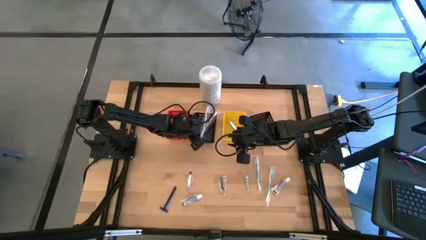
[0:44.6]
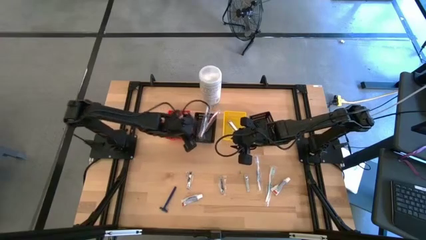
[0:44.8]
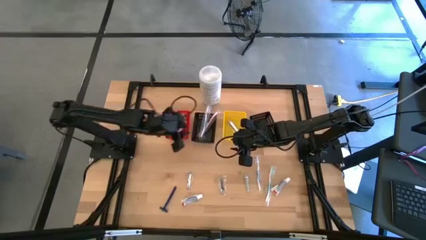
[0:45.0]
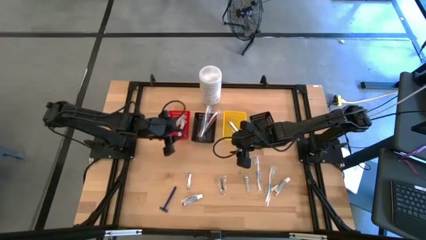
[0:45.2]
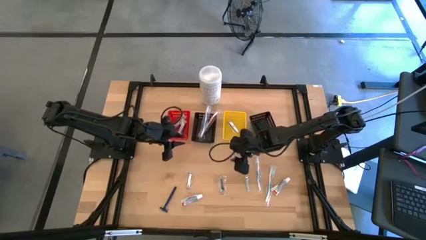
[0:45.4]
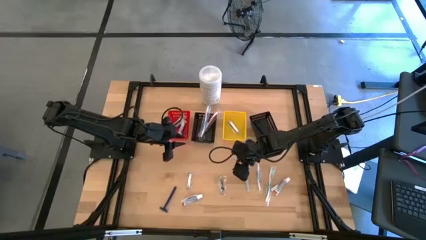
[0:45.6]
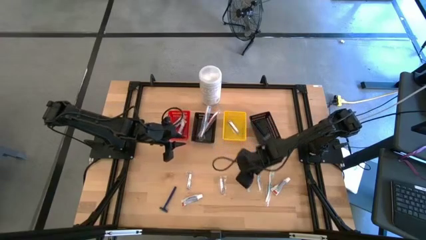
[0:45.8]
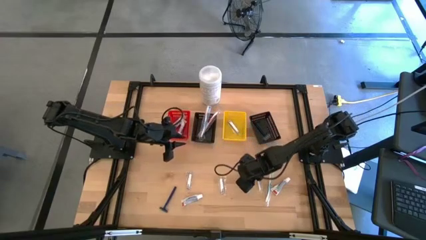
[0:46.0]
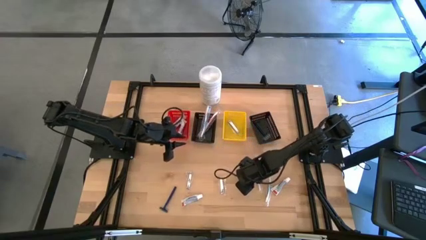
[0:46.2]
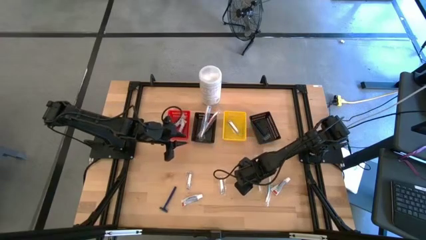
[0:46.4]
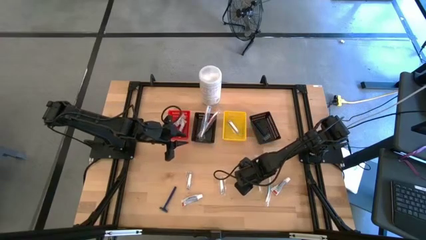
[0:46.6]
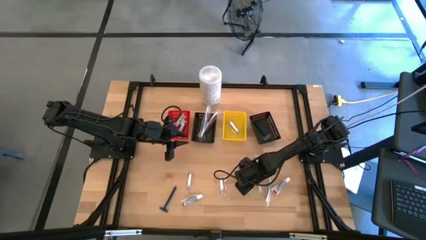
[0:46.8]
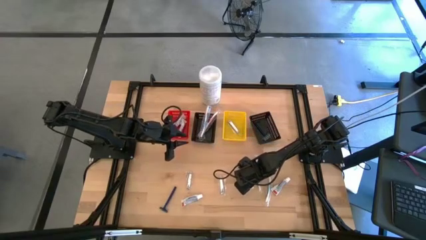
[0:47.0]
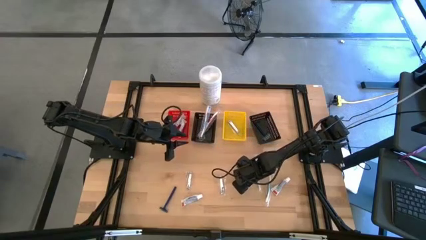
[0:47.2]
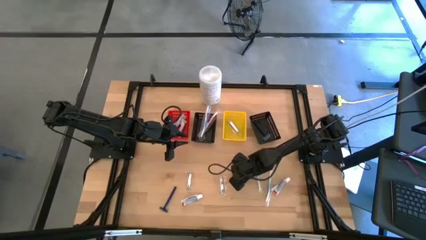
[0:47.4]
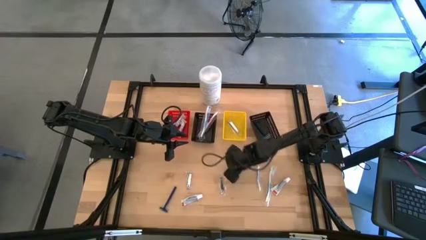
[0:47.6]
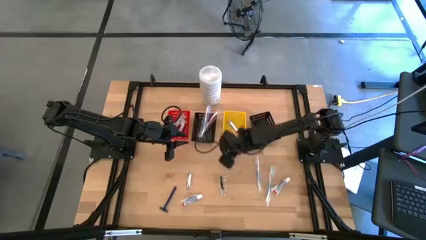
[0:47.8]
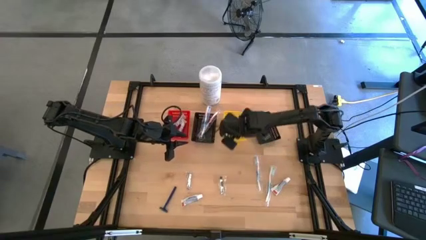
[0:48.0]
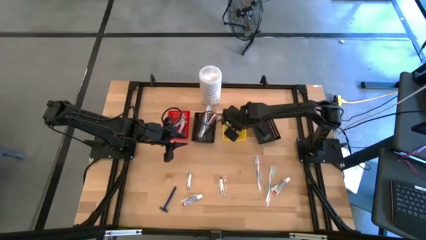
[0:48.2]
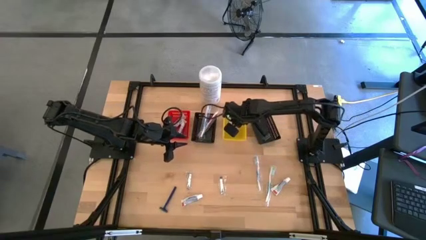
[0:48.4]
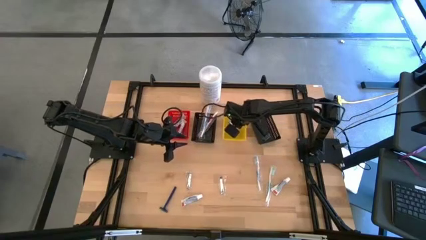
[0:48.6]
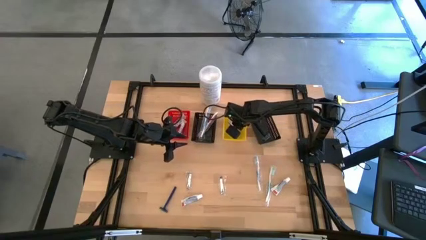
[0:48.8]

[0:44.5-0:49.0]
Task: Pick & Place Travel size toiletries
Put the nail cutter into the yellow basket

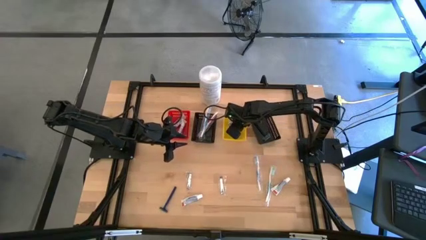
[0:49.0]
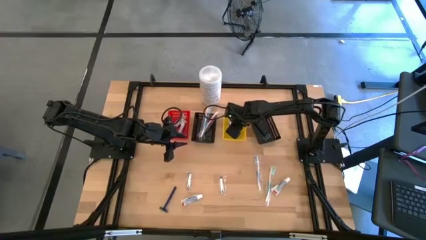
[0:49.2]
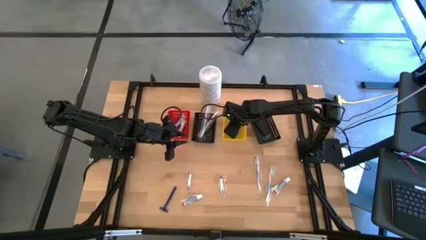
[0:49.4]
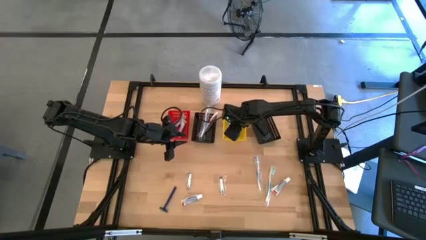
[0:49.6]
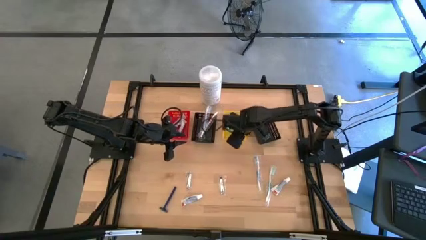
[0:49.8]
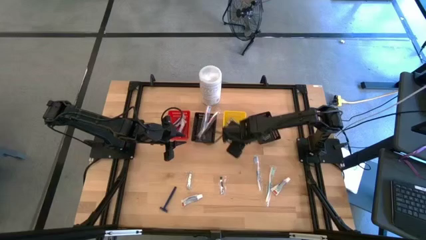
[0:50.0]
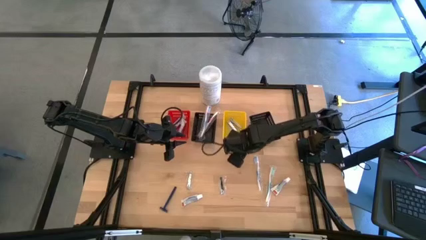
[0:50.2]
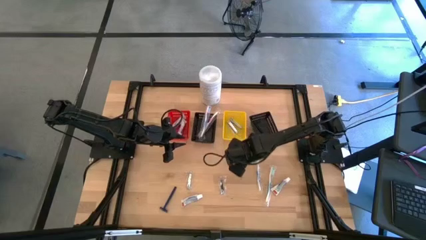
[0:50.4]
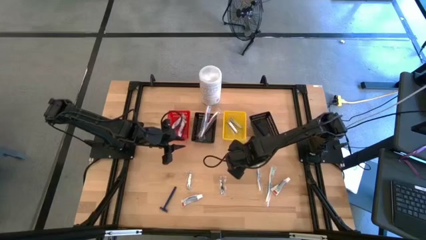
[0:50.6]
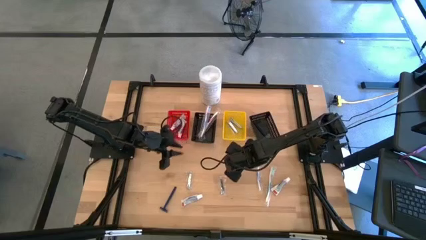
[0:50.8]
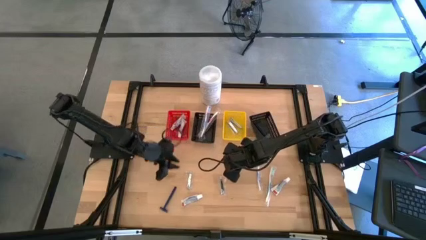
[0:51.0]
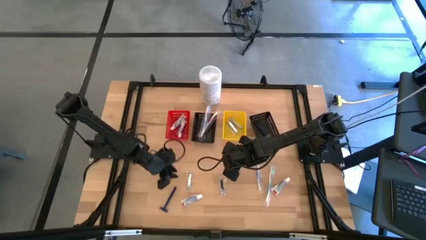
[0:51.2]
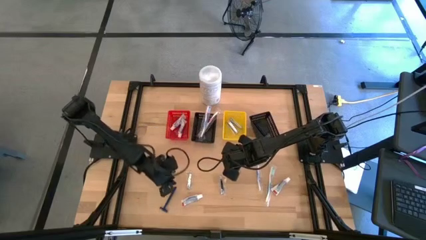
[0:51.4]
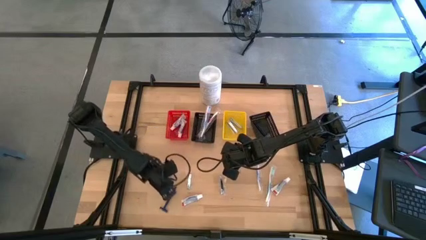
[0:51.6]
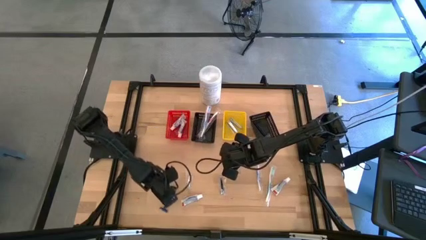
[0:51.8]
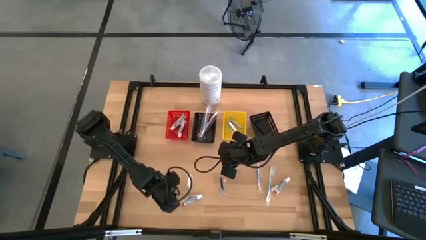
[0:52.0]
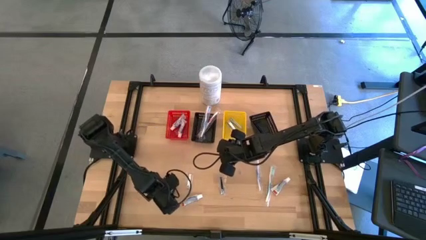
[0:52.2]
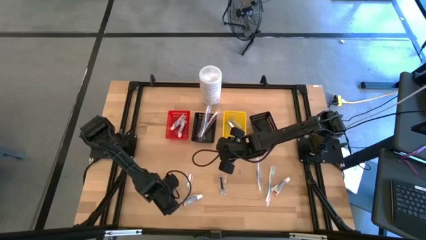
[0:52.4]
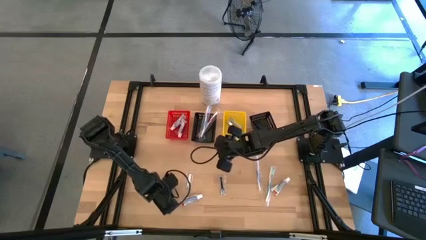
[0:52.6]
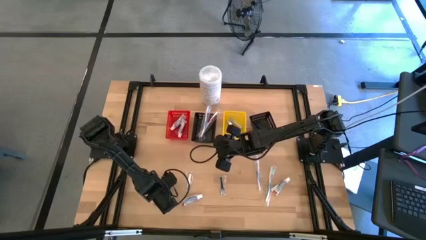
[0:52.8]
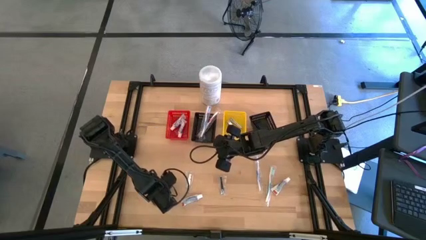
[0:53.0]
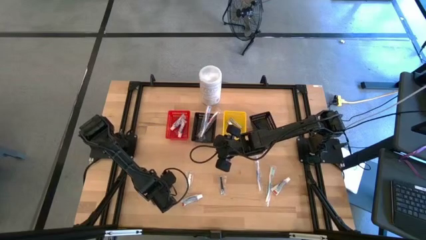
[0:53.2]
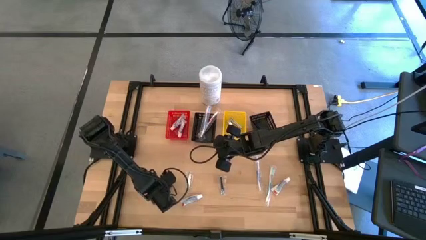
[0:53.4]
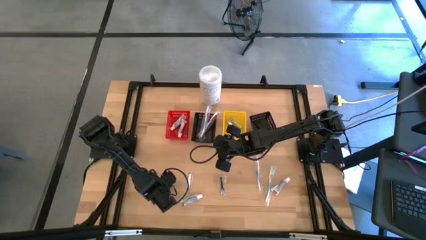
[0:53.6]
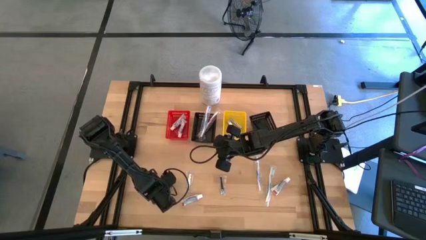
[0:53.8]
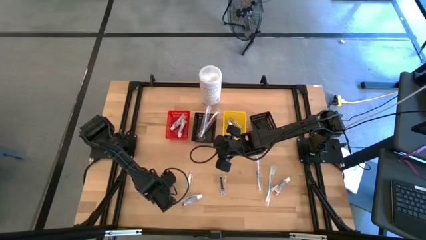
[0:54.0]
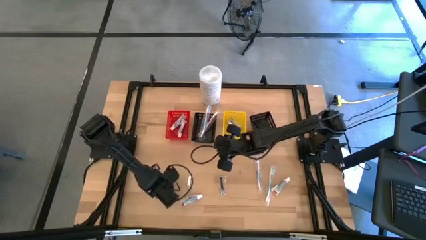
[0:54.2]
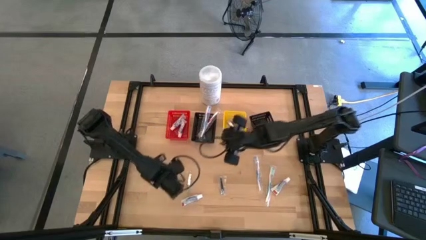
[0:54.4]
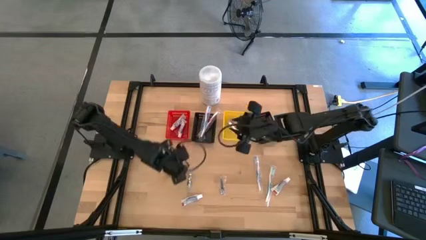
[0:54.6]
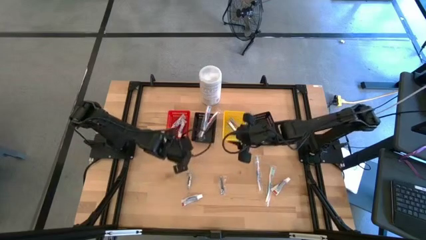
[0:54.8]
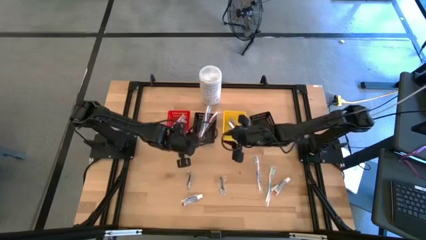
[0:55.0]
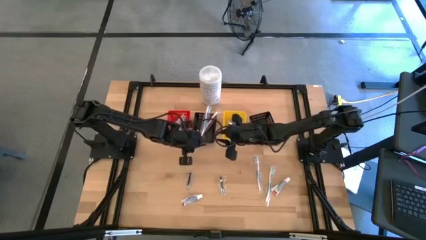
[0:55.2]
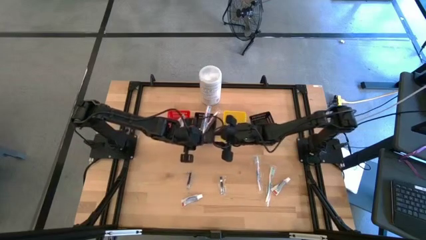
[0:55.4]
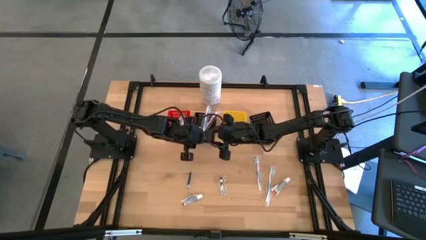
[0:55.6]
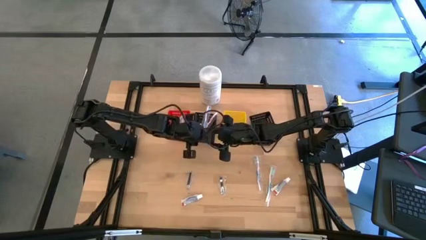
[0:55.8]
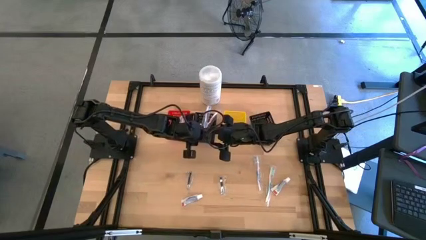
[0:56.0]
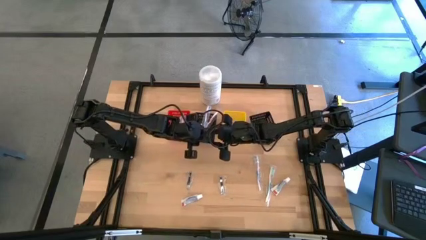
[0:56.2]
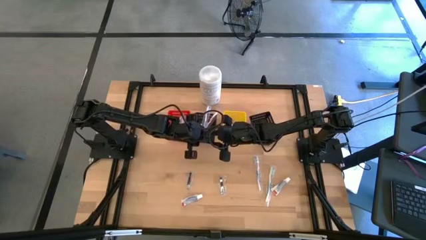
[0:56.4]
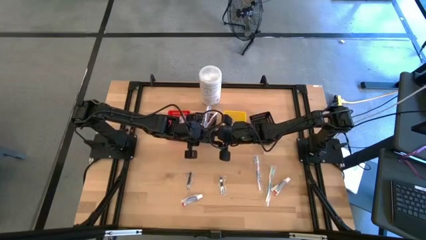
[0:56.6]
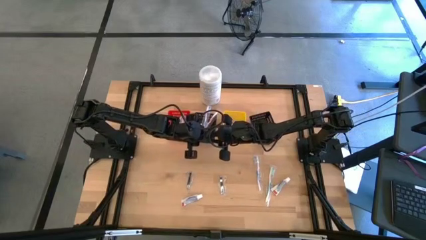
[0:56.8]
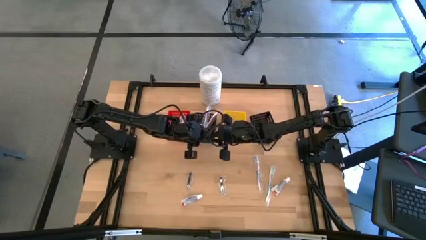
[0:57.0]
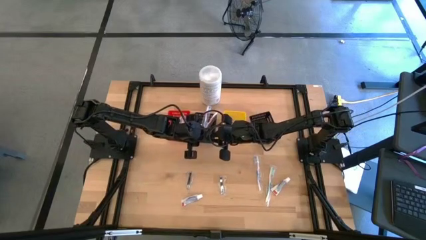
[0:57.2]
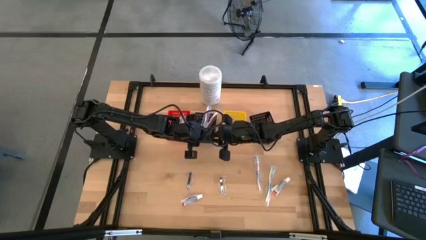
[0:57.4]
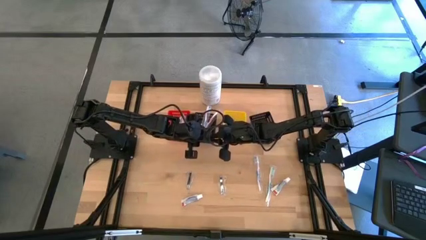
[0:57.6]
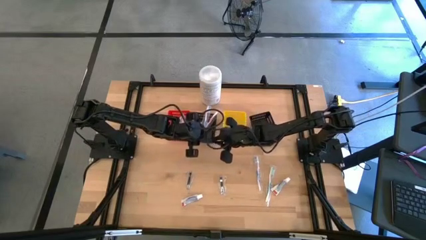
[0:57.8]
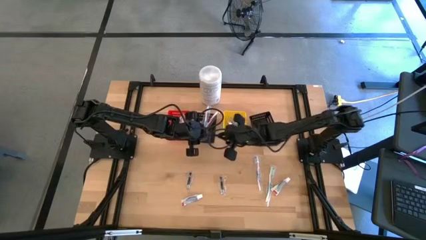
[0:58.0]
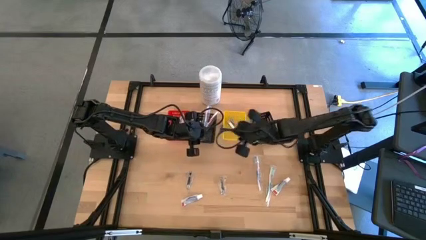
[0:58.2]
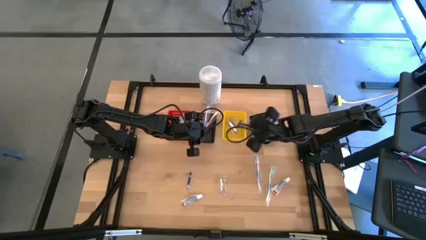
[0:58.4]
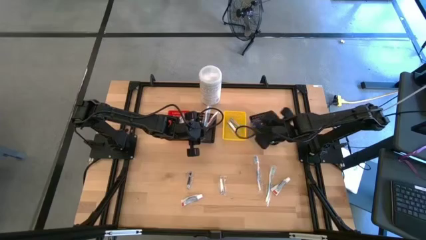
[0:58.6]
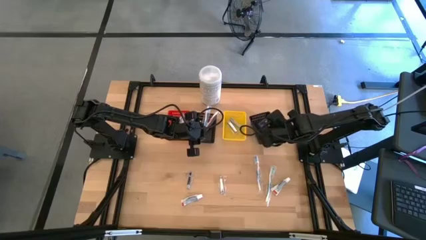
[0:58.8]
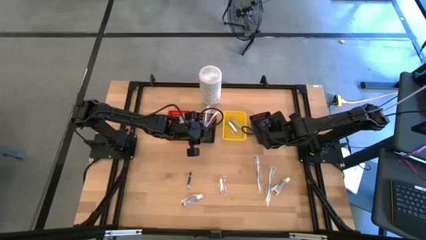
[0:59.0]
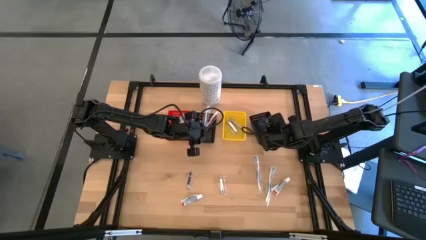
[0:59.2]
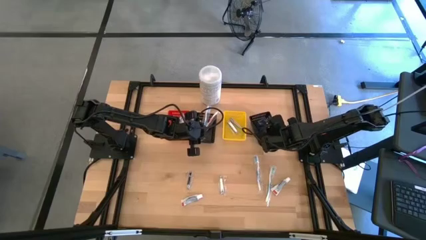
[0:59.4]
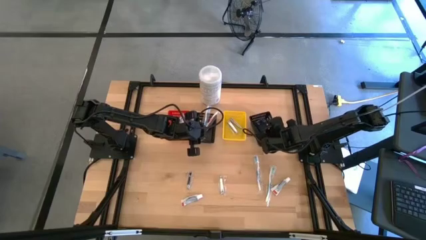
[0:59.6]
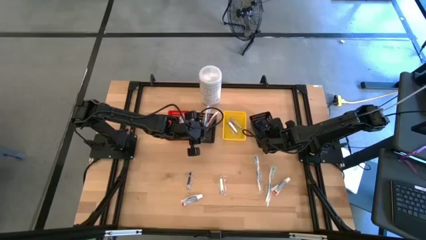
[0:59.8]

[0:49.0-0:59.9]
Put the razor into the right black basket

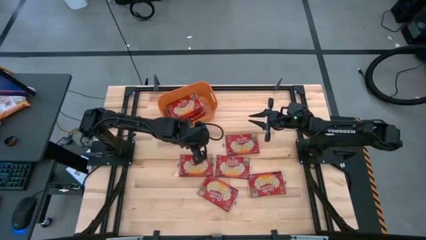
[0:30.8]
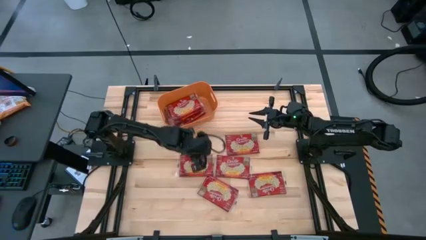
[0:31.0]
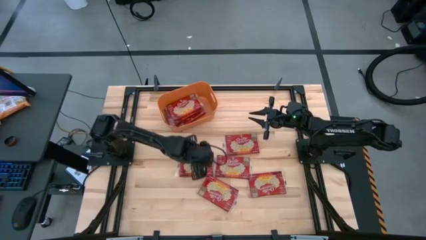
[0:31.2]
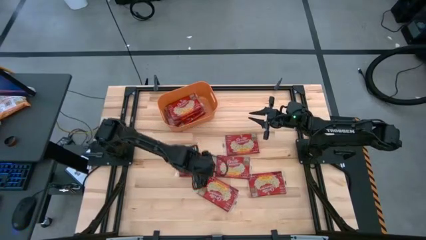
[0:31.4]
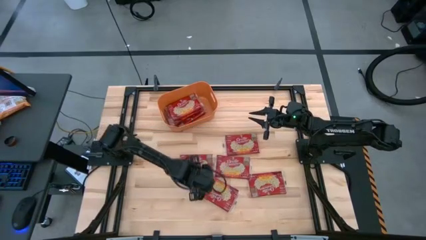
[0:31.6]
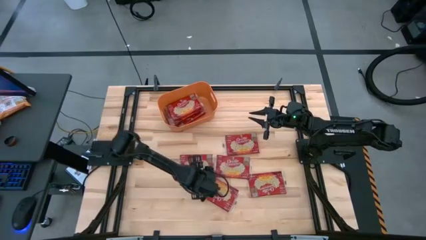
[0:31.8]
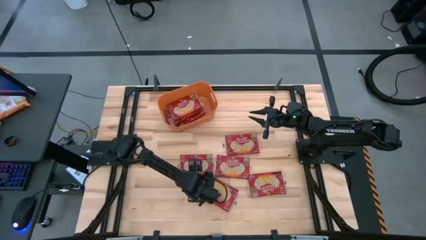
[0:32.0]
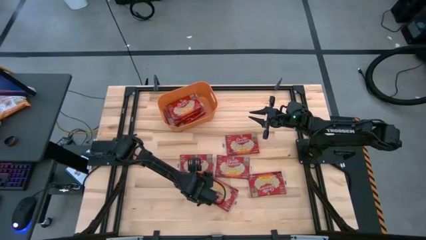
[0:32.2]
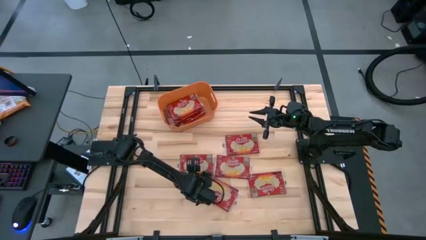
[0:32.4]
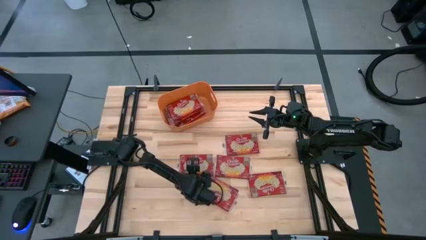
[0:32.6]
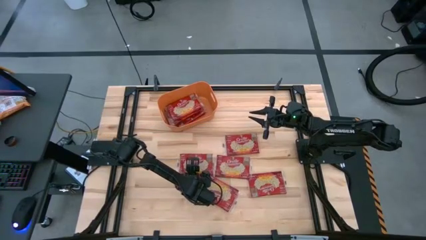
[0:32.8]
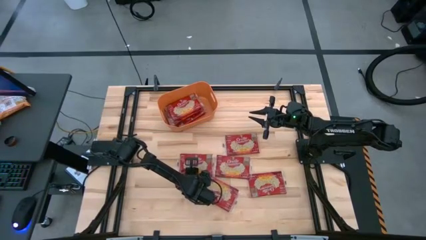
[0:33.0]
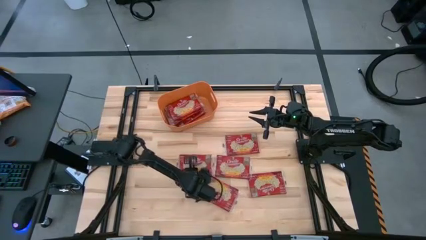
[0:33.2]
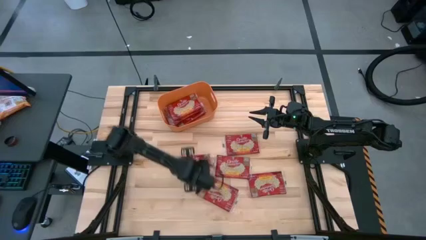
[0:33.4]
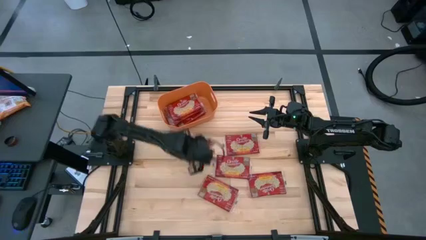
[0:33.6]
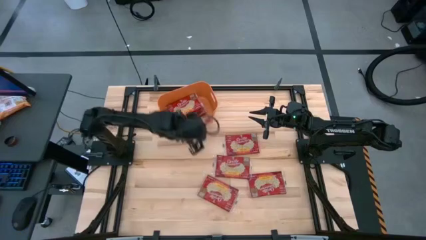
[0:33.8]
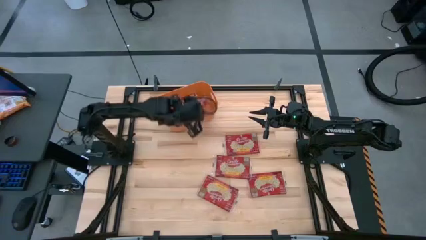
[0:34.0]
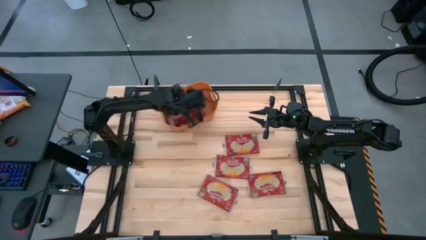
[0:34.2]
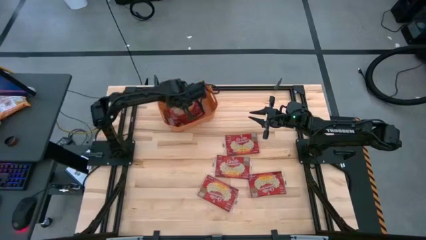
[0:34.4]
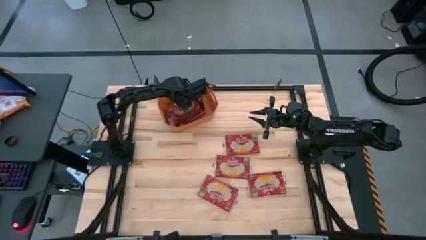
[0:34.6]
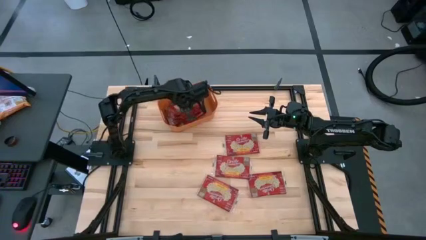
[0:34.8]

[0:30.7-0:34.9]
Task: Sort popcorn bags into baskets
Put the red popcorn pack into the orange bin
